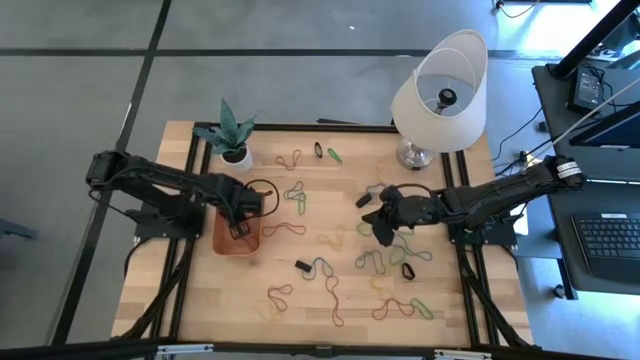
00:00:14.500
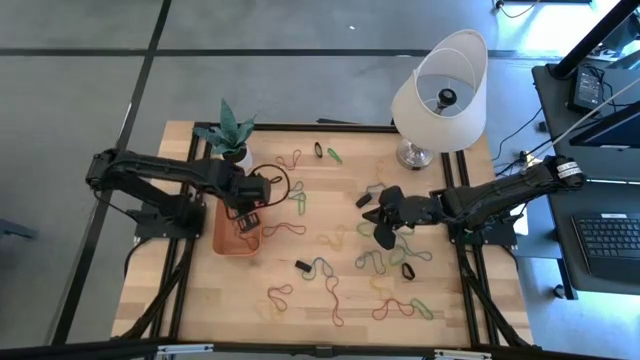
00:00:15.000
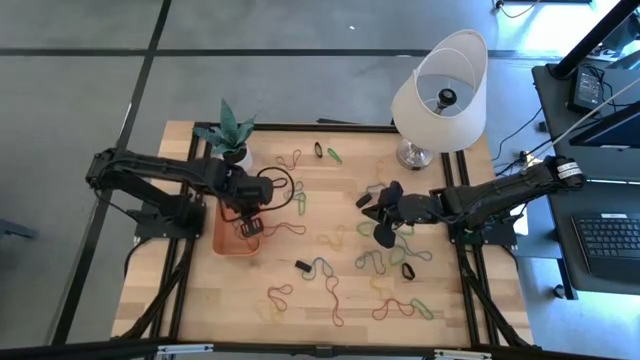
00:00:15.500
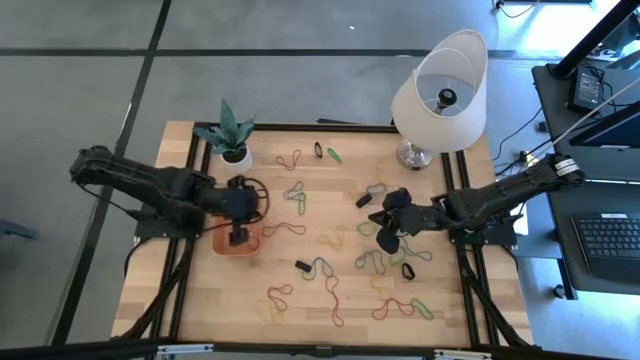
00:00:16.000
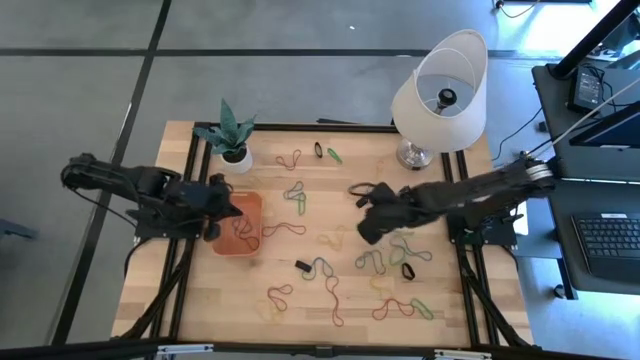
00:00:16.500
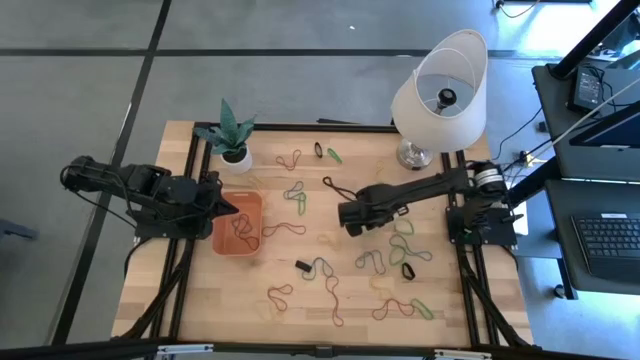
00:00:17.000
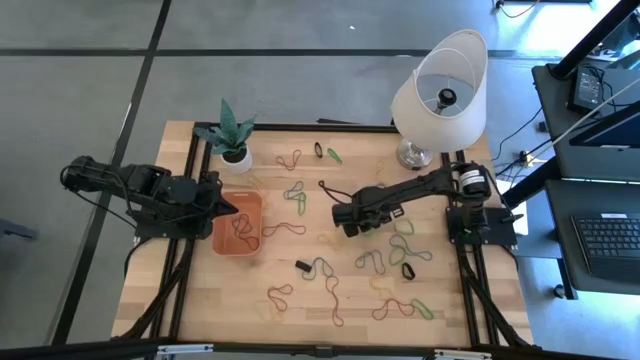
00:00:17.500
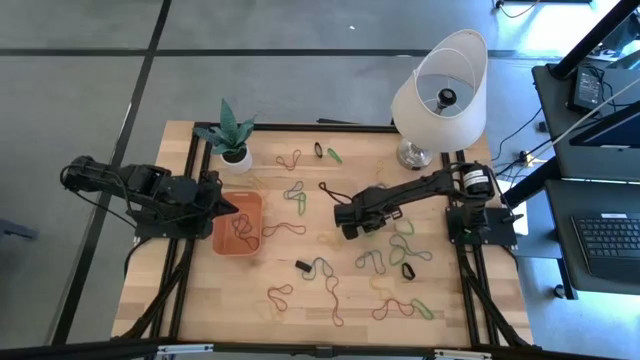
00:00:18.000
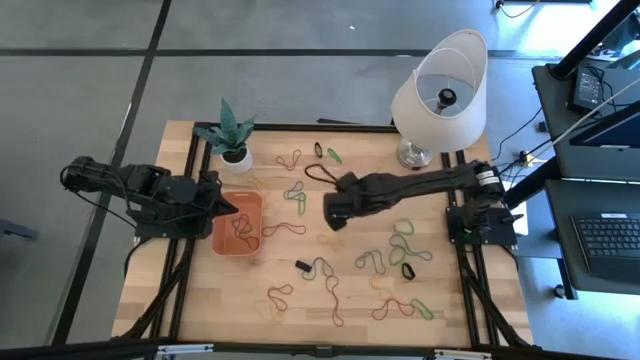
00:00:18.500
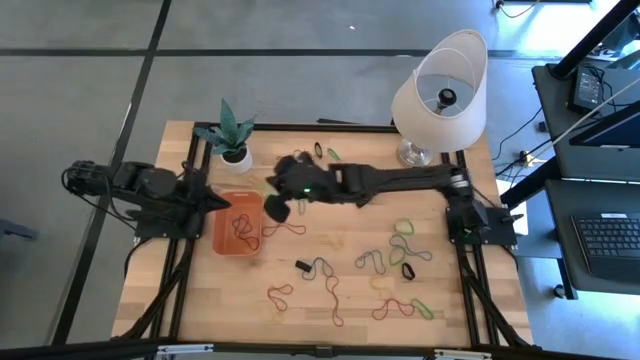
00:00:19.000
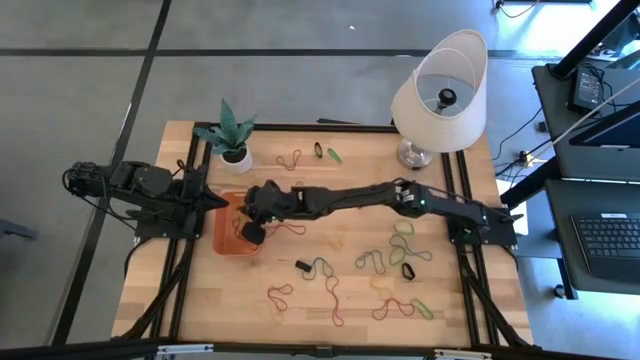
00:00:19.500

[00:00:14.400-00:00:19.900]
Task: Pick and place rubber bands into bin
Put the green rubber band into the orange bin

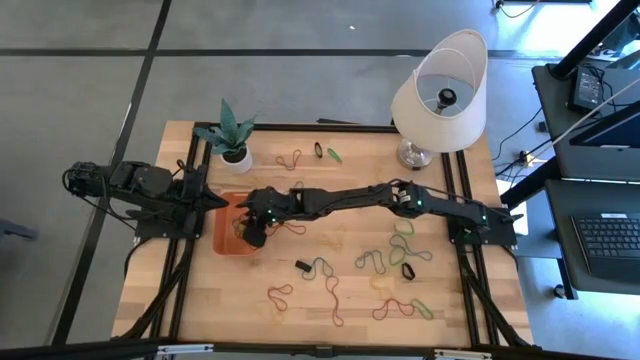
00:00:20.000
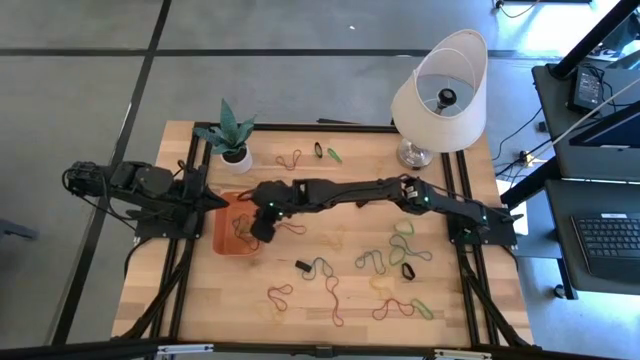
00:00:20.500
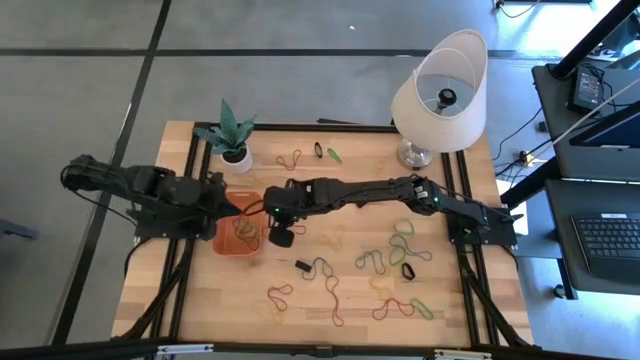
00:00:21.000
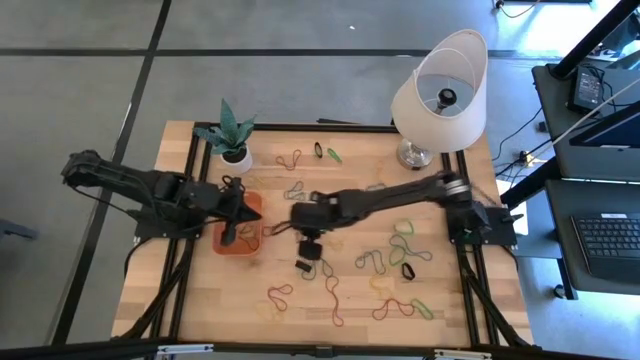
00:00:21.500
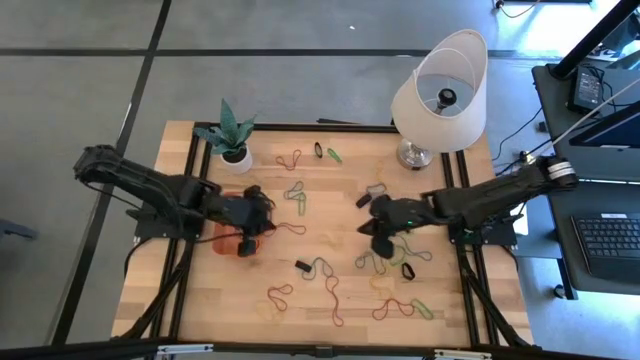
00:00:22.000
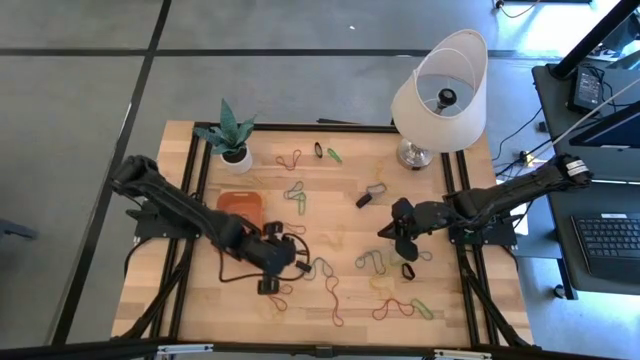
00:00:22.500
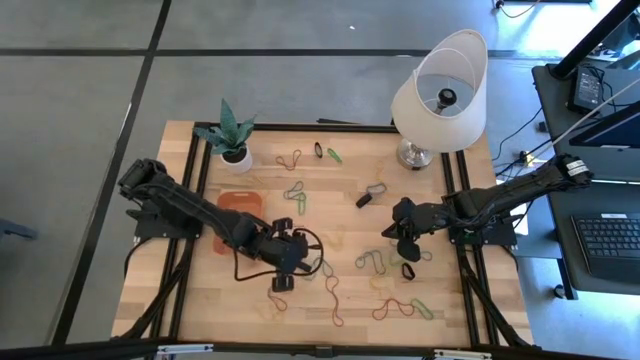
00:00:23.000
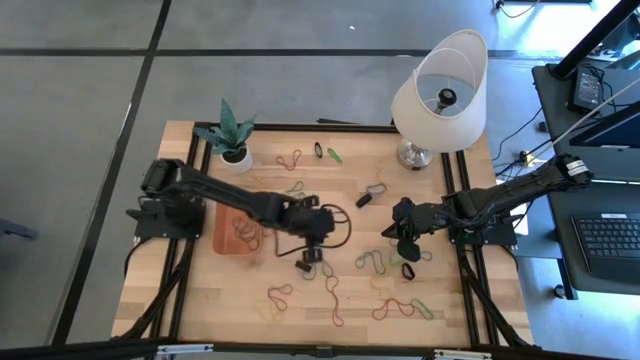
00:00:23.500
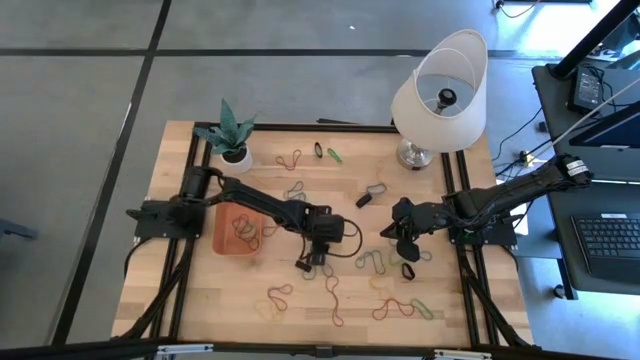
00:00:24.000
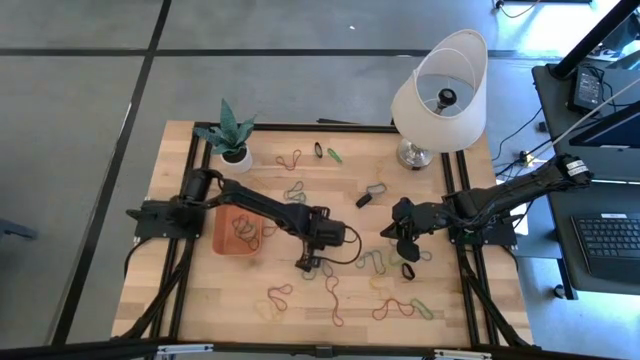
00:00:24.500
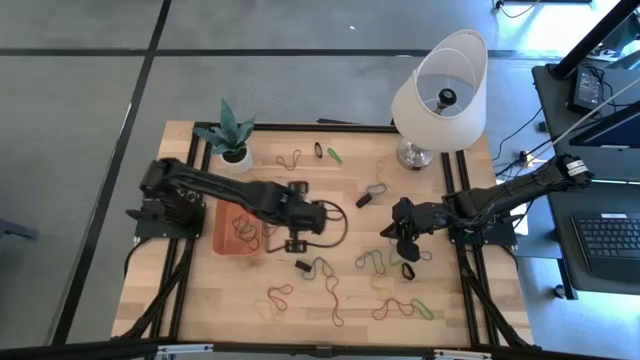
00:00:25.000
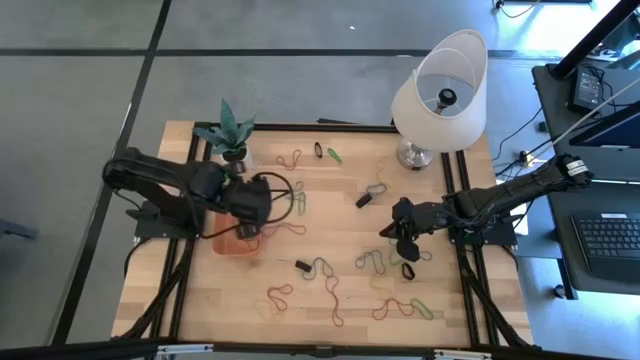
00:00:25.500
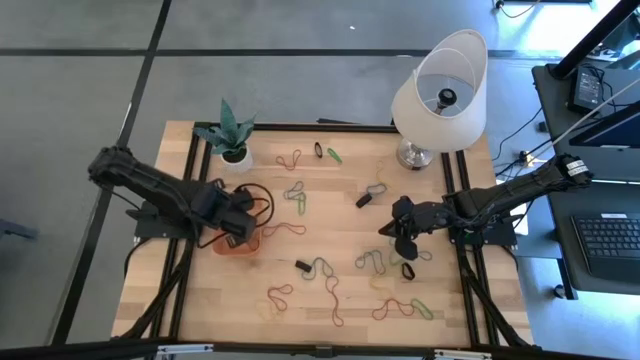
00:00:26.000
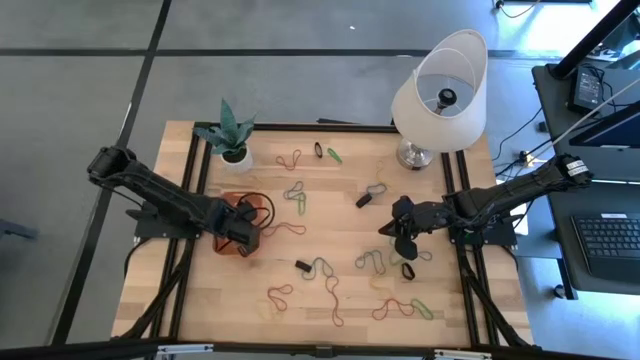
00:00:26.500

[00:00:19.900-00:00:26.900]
Put the yellow rubber band into the orange bin

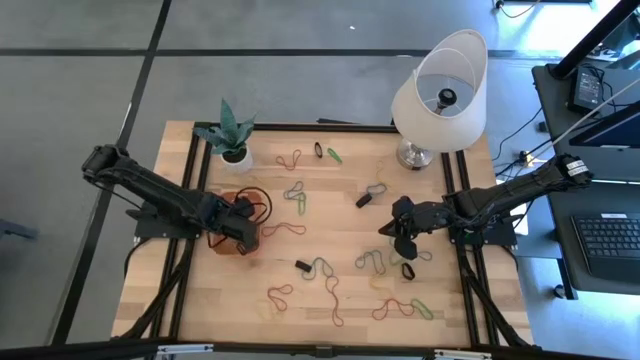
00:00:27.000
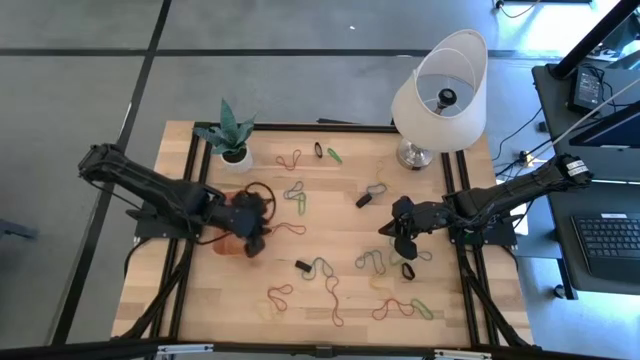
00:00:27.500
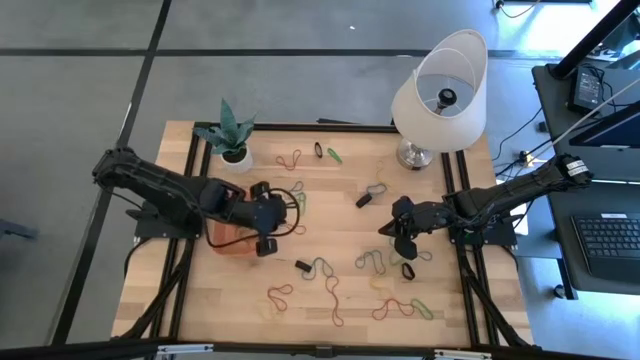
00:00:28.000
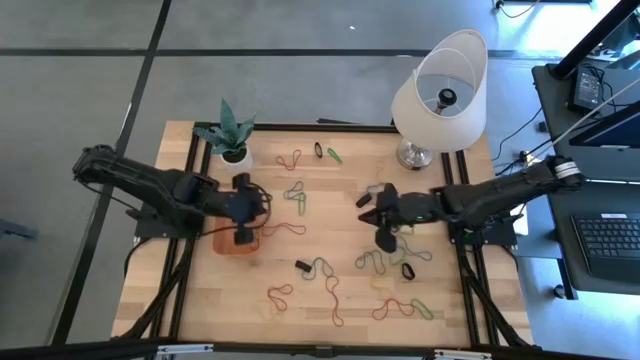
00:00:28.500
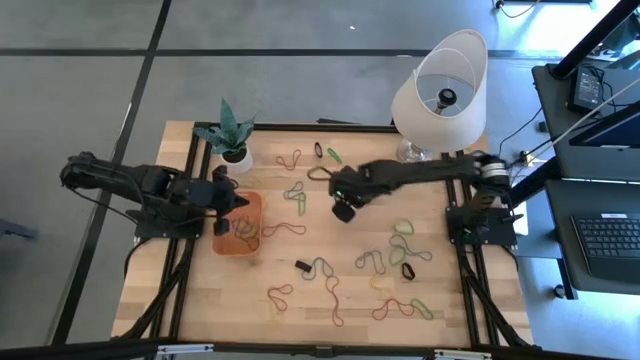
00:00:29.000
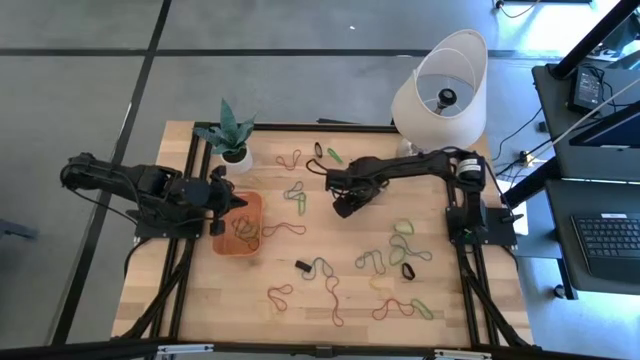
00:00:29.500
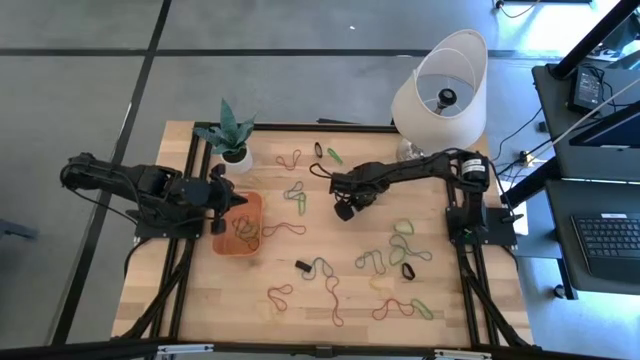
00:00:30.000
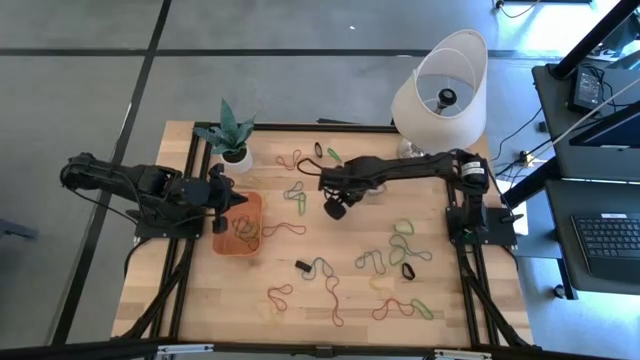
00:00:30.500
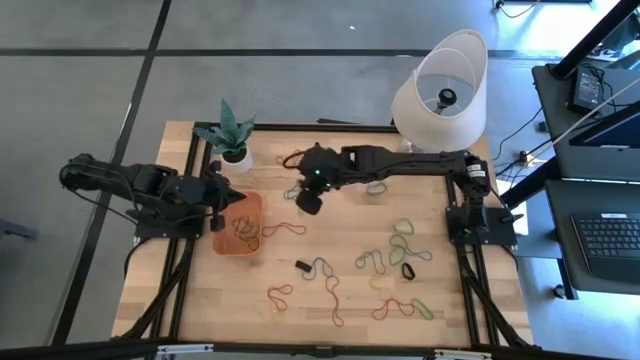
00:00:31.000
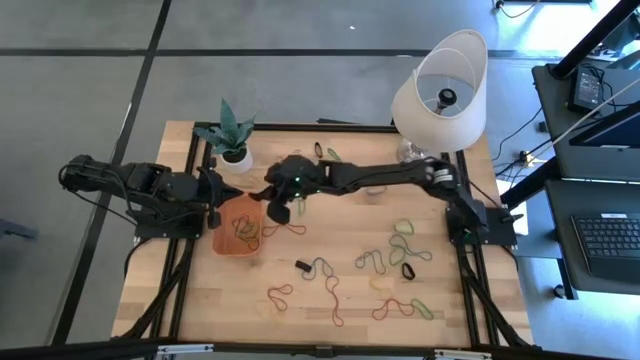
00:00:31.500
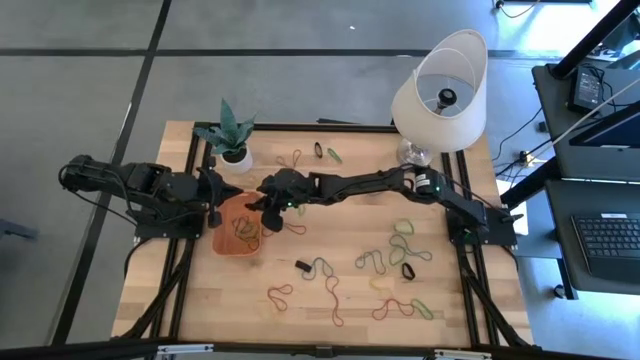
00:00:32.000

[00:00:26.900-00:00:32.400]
Put the black rubber band into the orange bin

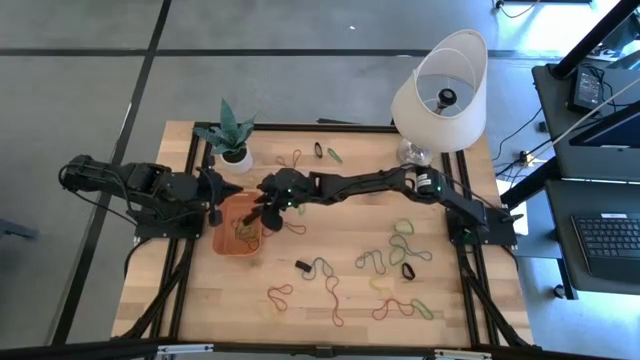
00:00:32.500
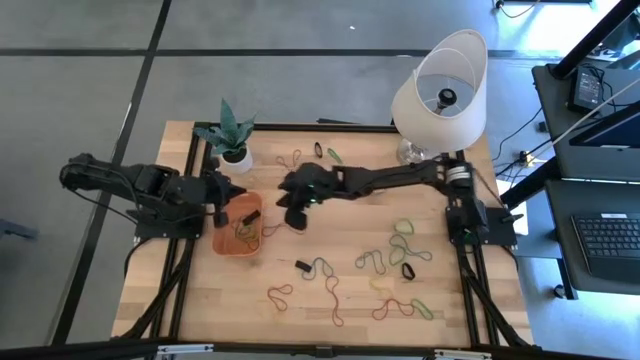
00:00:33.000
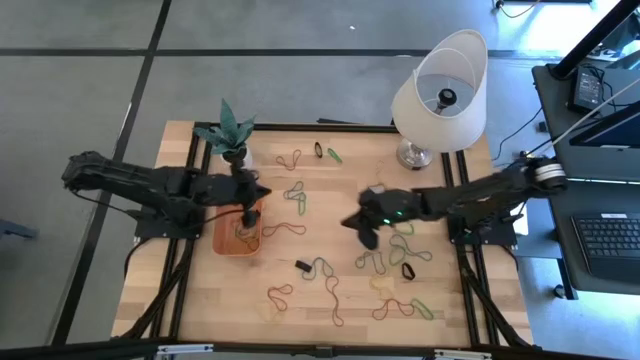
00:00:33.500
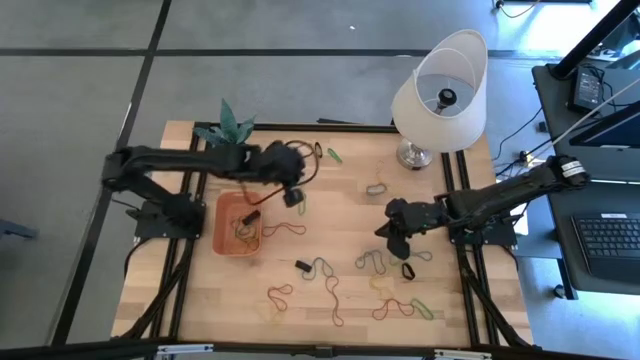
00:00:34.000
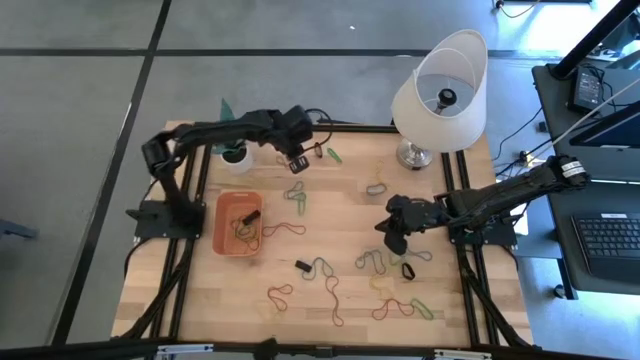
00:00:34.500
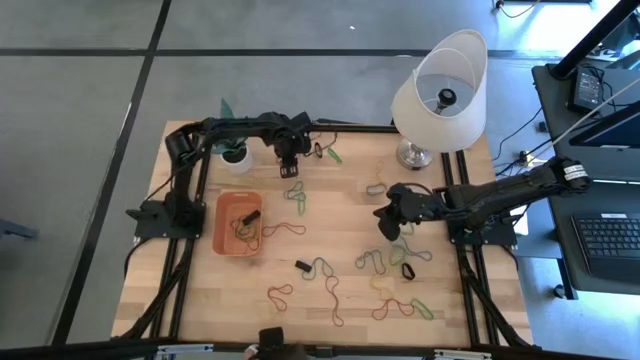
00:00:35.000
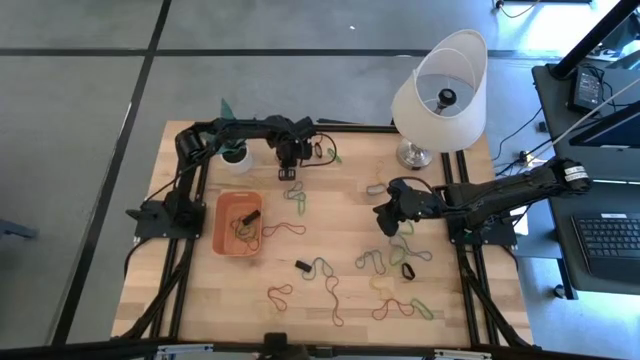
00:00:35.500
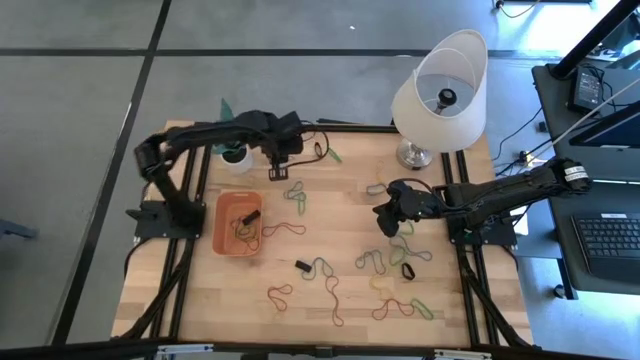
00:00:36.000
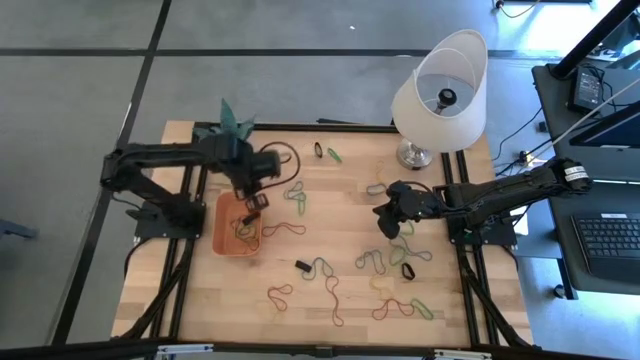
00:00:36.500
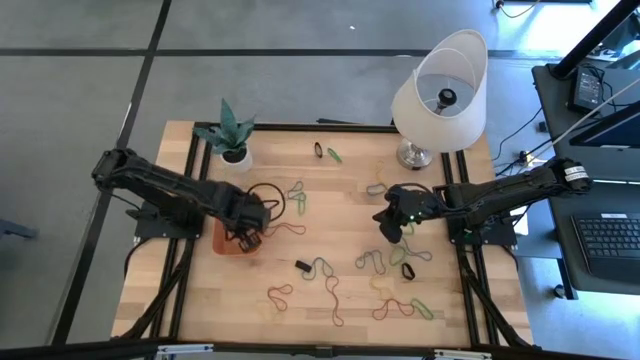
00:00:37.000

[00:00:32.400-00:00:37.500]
Put the red rubber band into the orange bin
